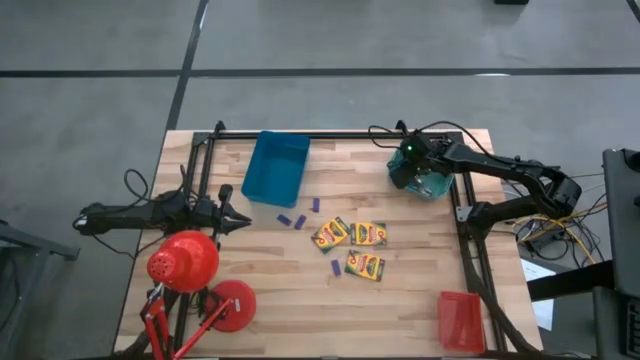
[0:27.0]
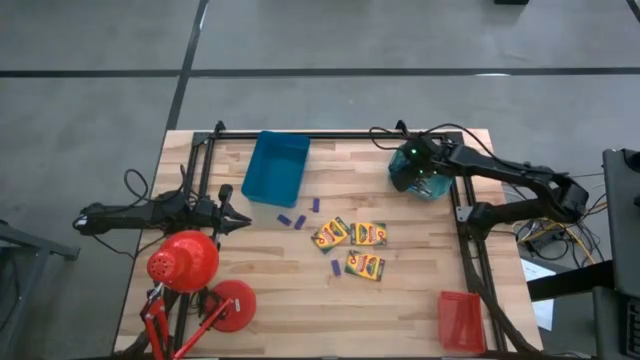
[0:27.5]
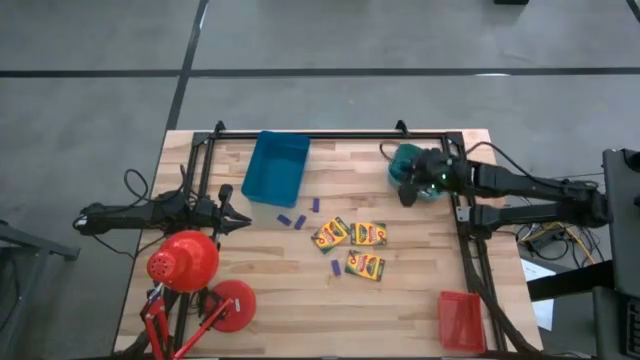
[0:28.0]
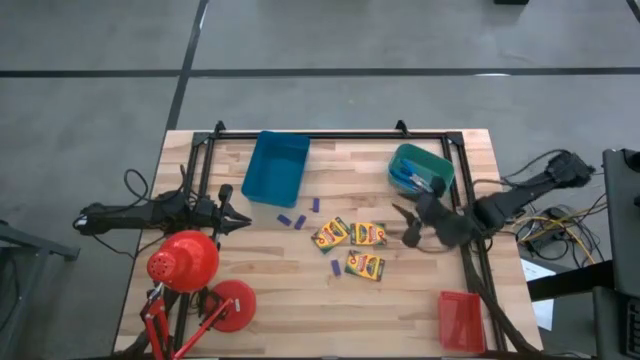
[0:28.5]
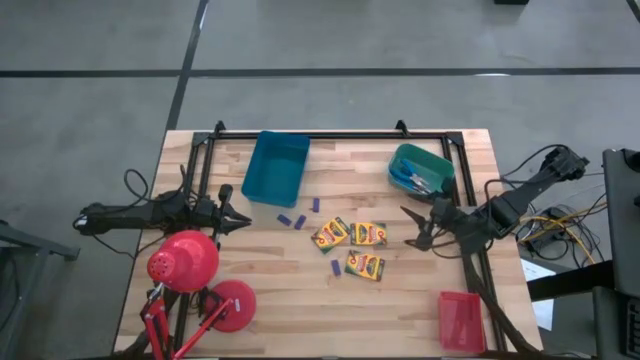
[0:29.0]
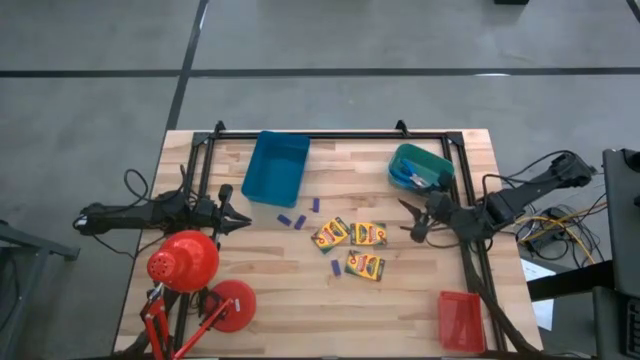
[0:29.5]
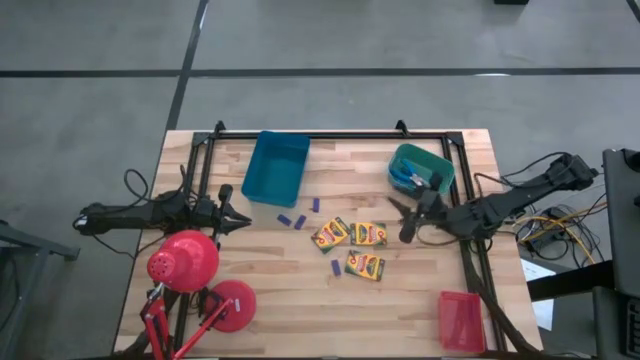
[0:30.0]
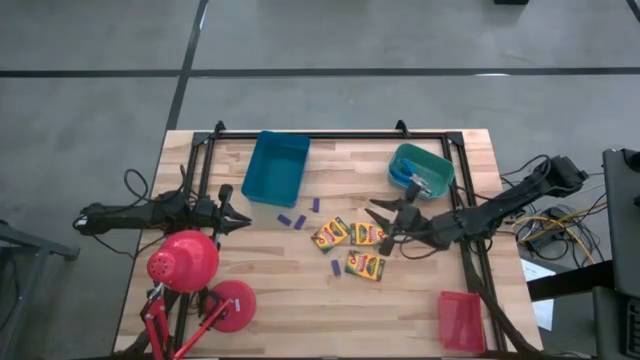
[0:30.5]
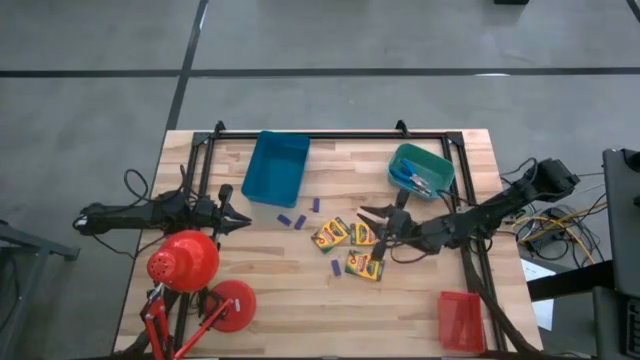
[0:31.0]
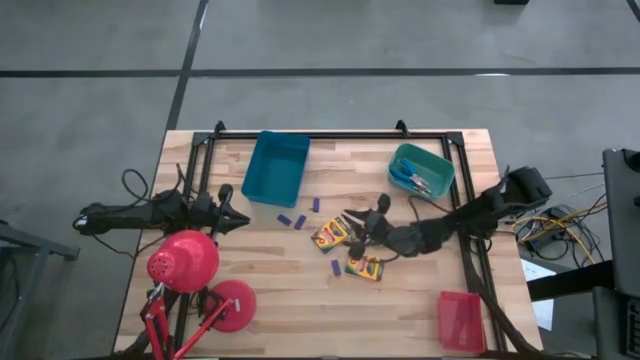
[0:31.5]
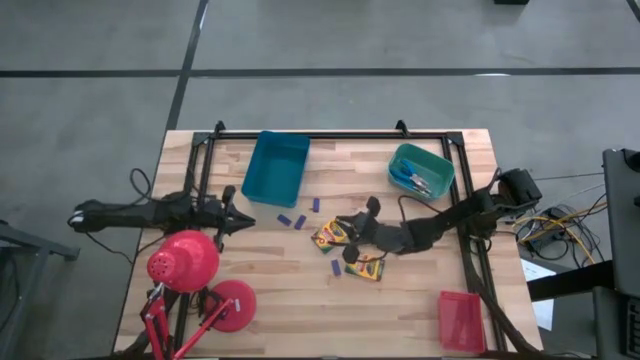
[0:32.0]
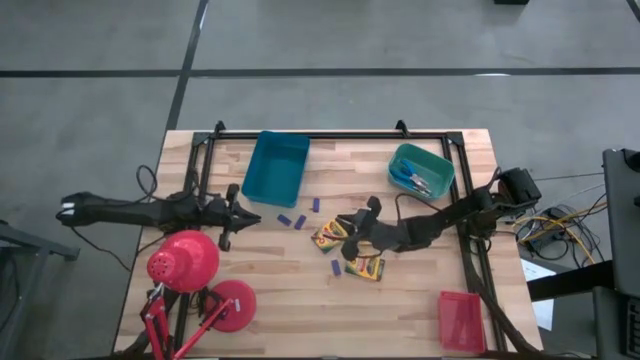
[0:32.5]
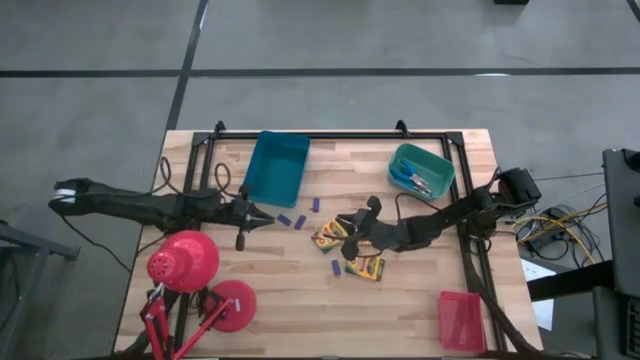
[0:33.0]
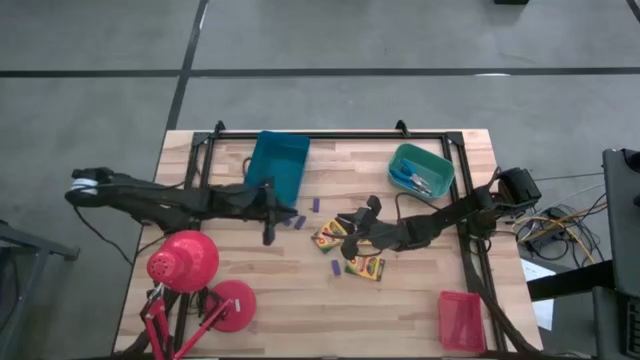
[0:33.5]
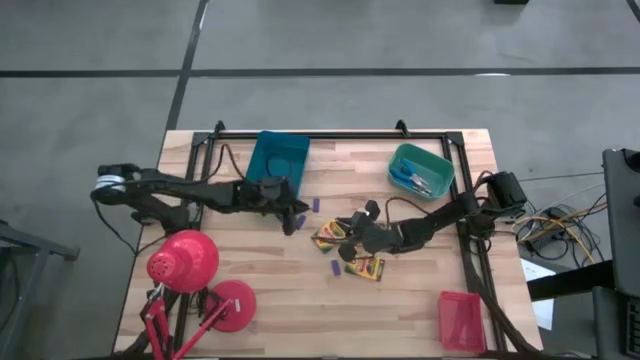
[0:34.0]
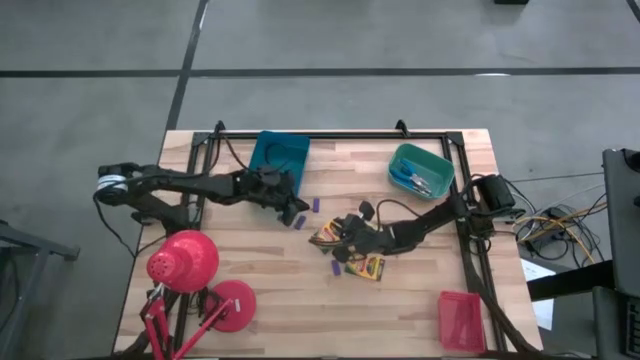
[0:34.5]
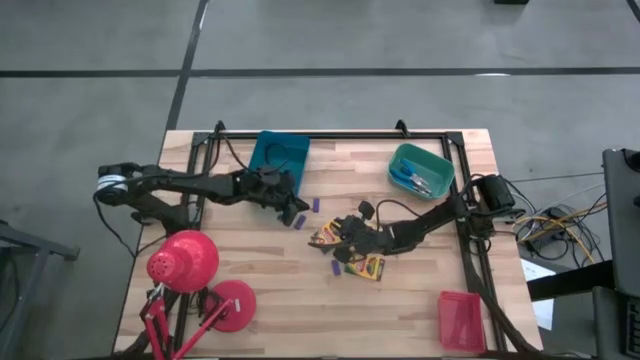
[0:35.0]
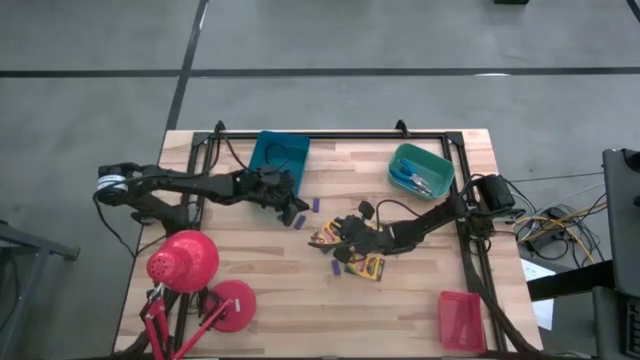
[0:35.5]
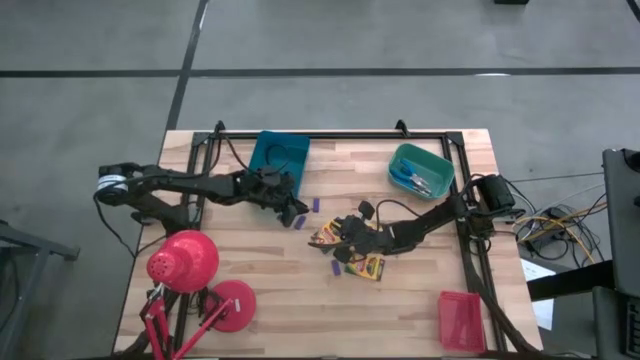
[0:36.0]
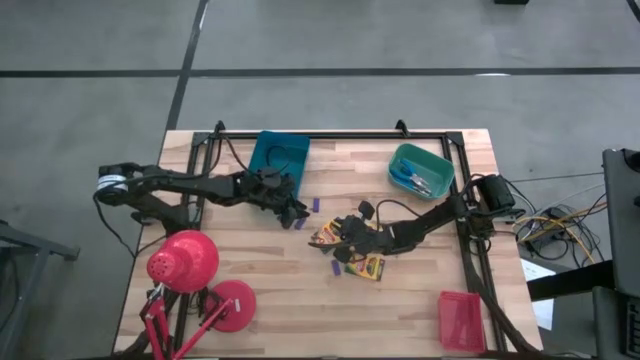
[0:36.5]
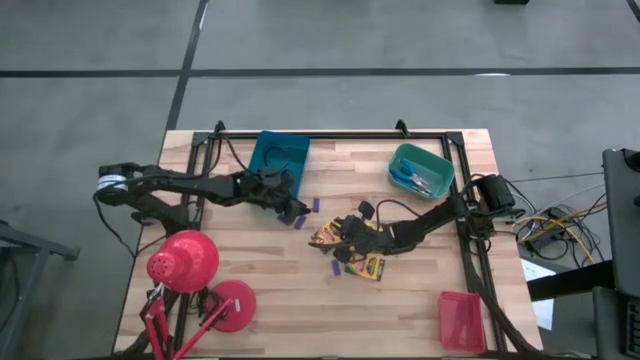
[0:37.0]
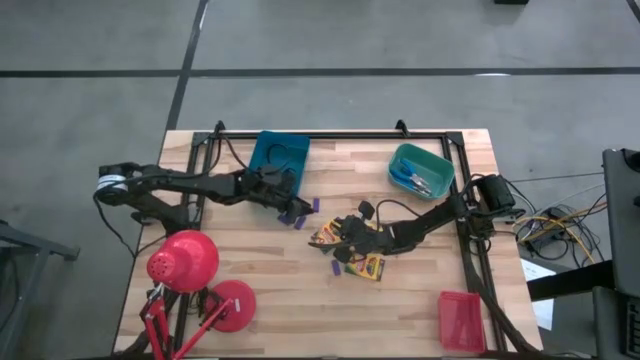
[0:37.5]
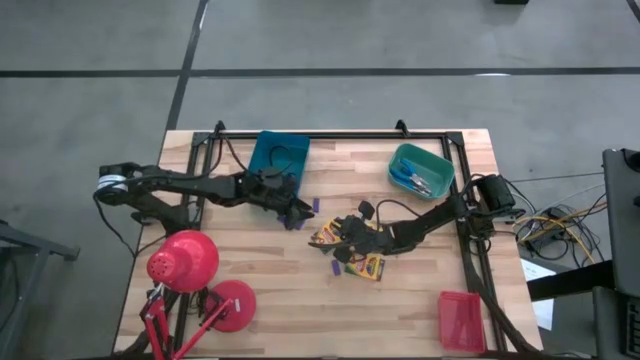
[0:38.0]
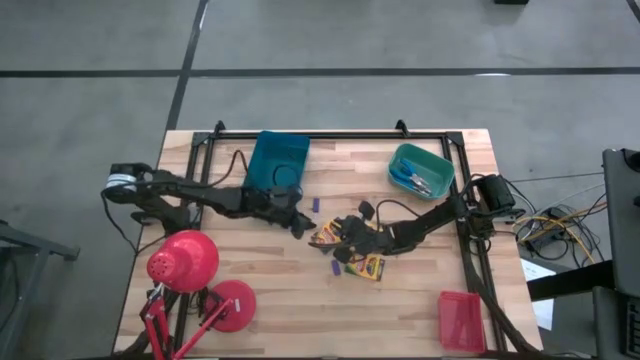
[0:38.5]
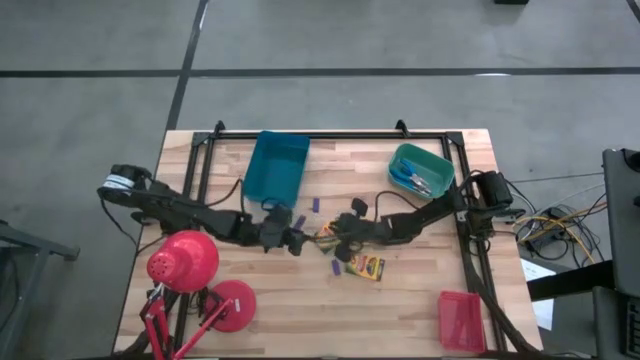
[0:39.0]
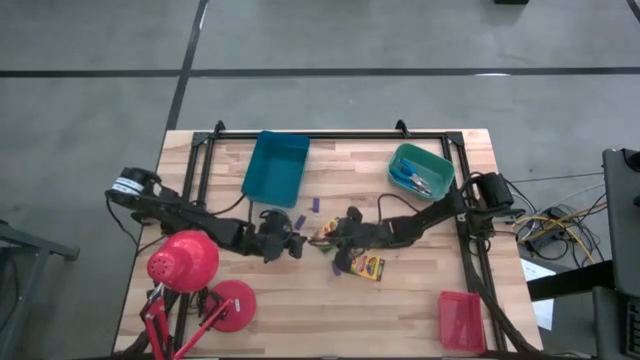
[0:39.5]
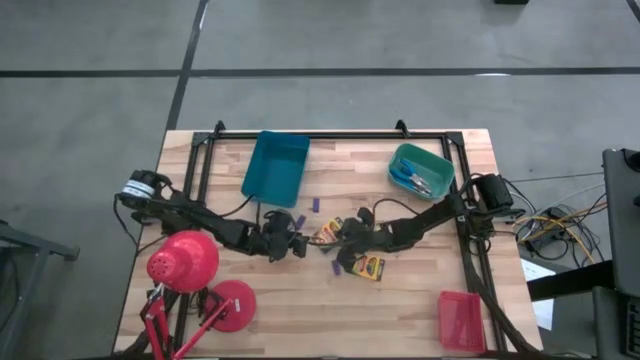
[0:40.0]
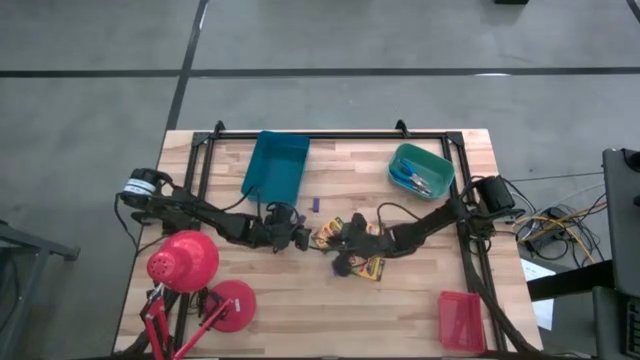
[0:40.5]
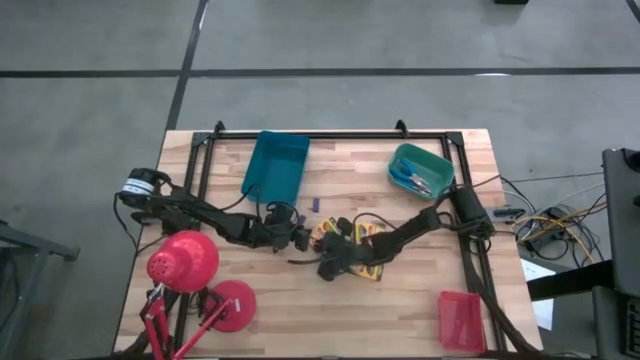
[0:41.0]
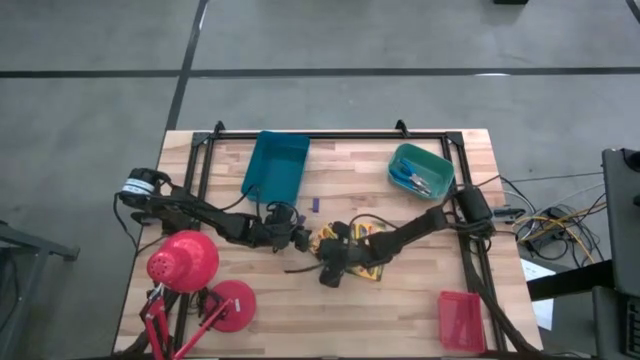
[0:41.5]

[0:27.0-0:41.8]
Task: Pick & Place School Supplies
Put the yellow crayon box into the blue bin

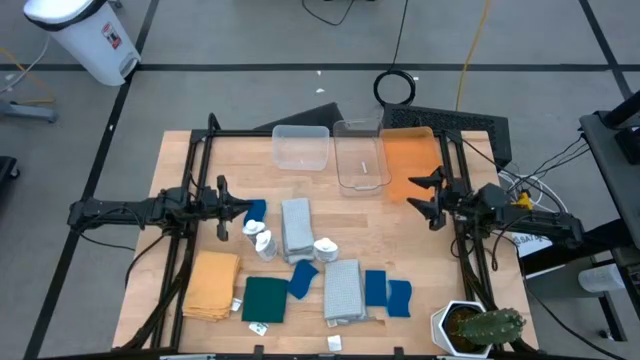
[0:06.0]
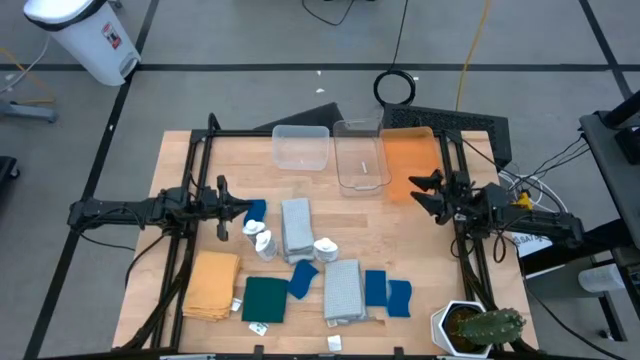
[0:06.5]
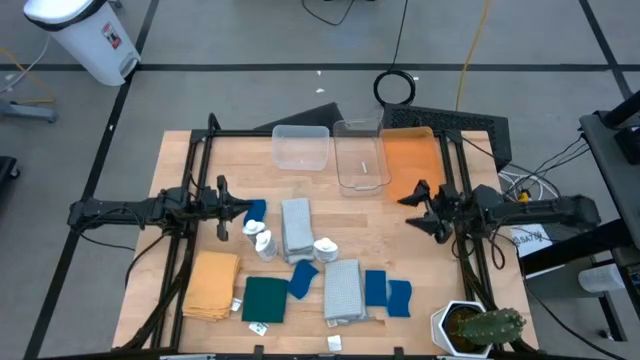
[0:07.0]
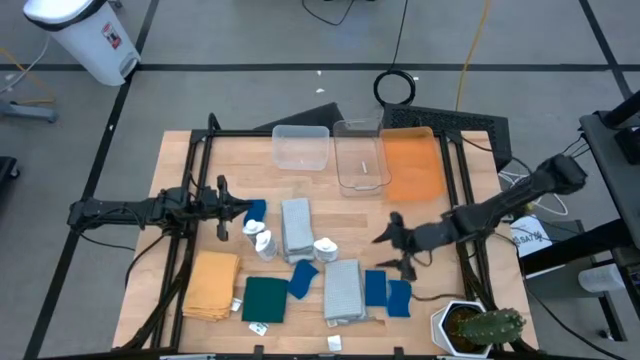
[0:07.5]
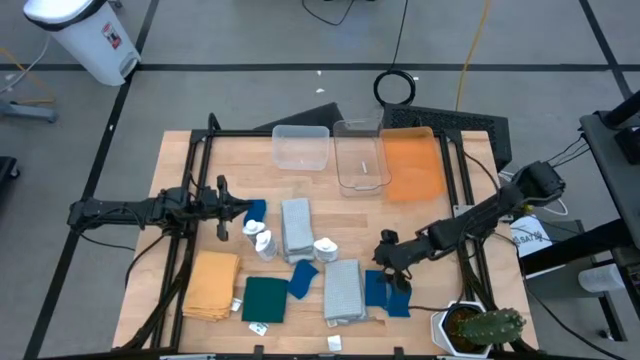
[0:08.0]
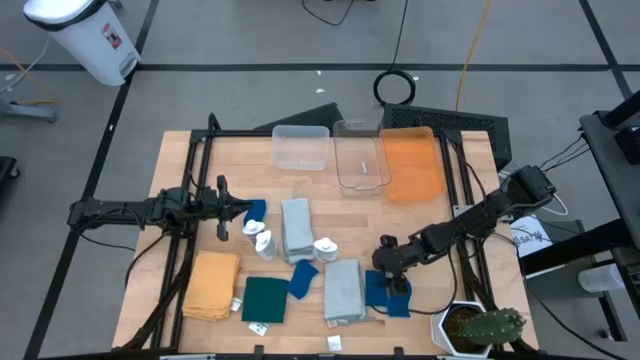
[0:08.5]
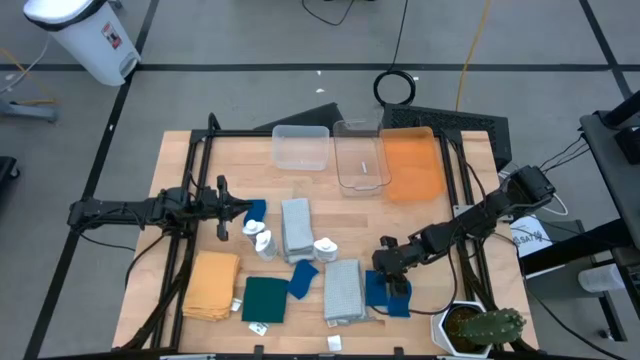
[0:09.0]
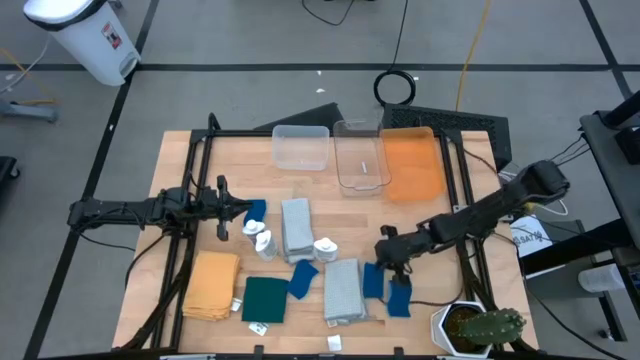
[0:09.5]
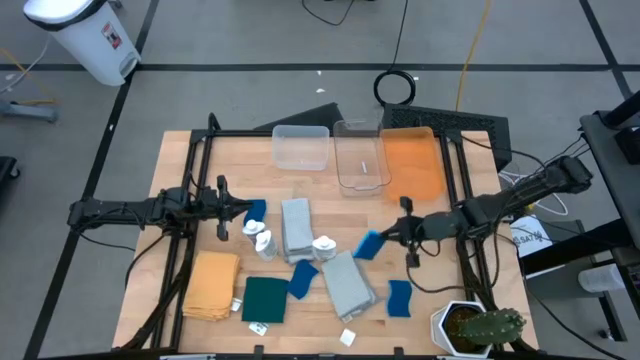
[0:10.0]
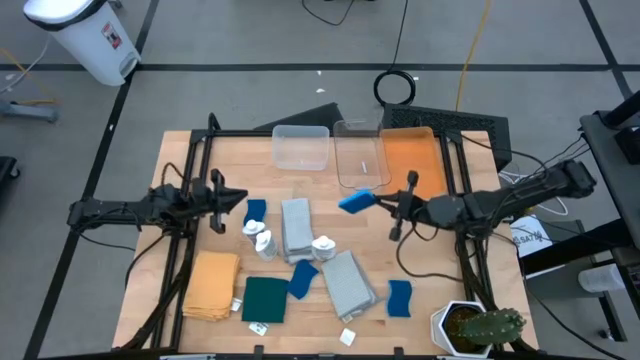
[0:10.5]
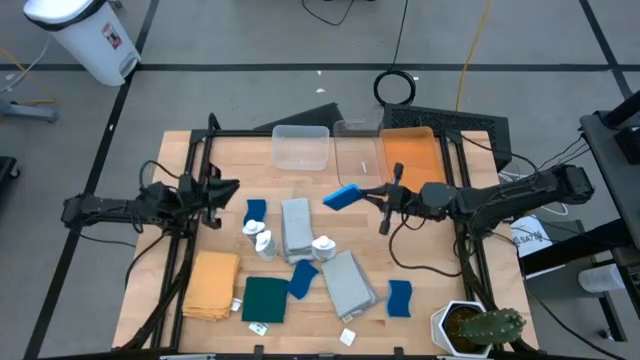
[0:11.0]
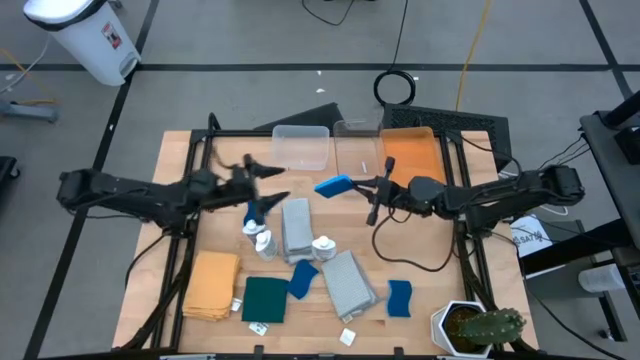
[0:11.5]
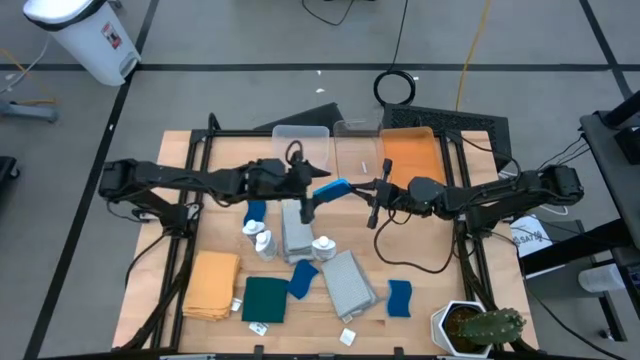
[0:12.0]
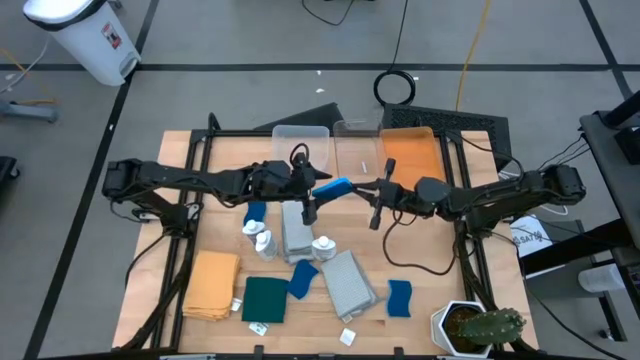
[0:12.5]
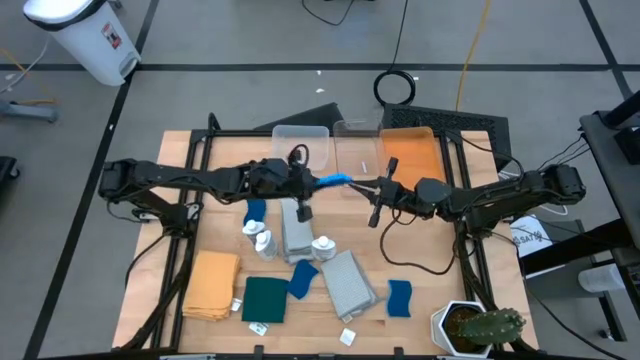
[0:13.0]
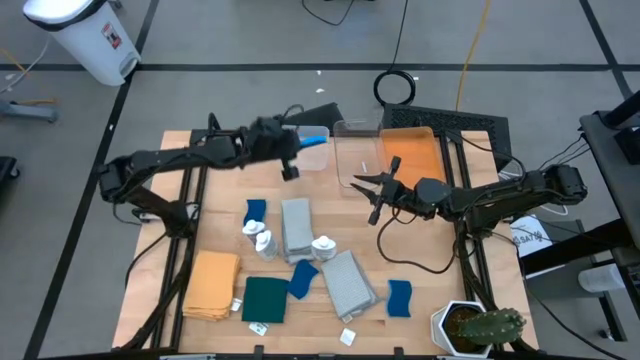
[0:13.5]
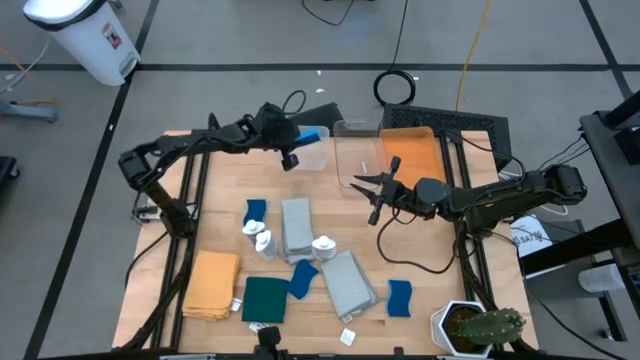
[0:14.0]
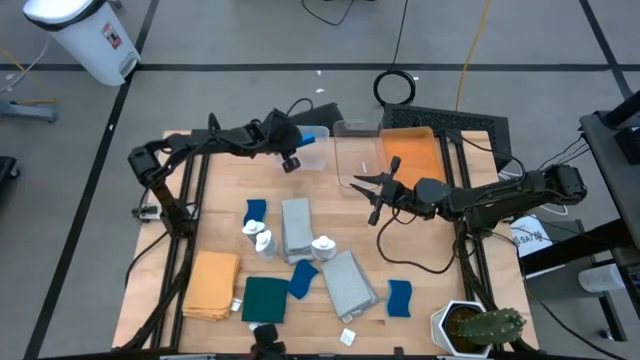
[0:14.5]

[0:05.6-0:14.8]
Task: Pick & Place Kitchen Items
Put the blue sponge into the white bin
